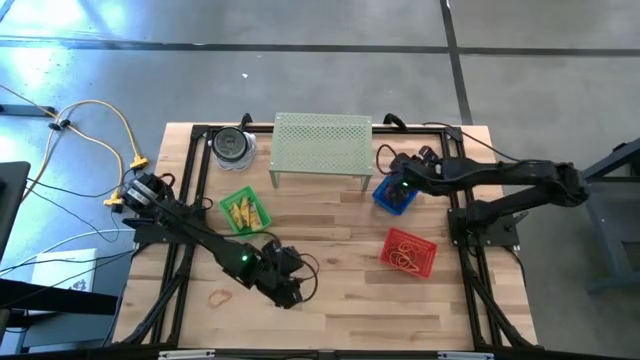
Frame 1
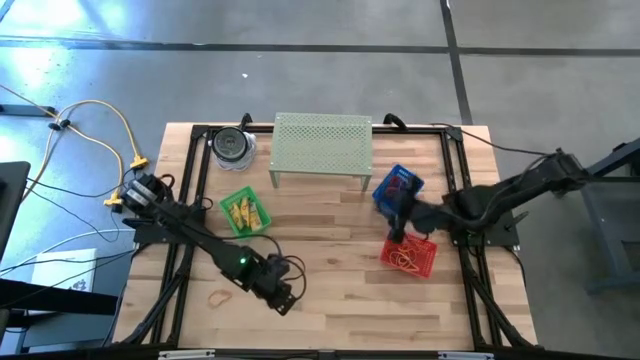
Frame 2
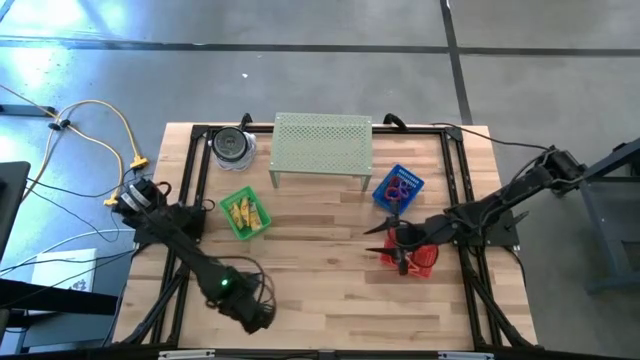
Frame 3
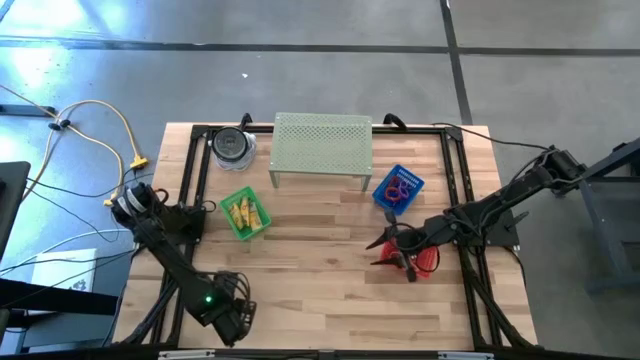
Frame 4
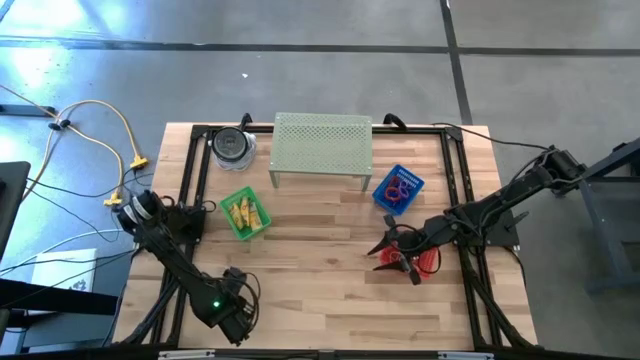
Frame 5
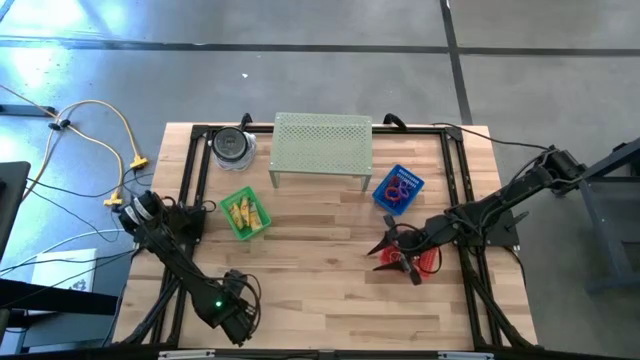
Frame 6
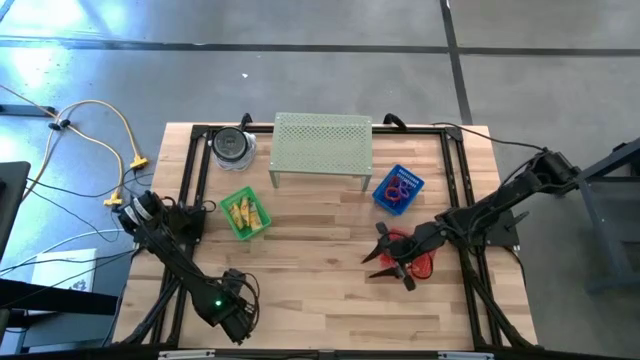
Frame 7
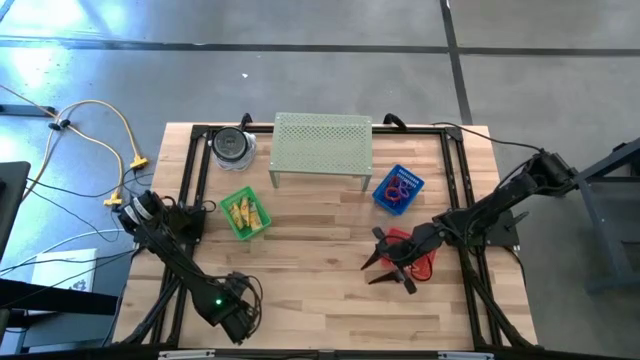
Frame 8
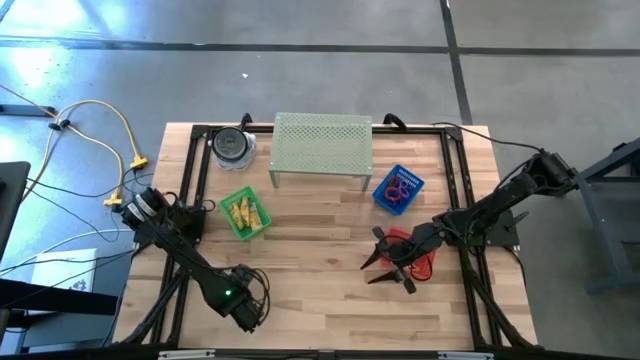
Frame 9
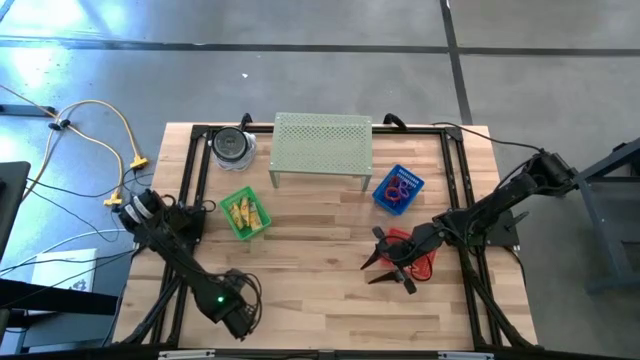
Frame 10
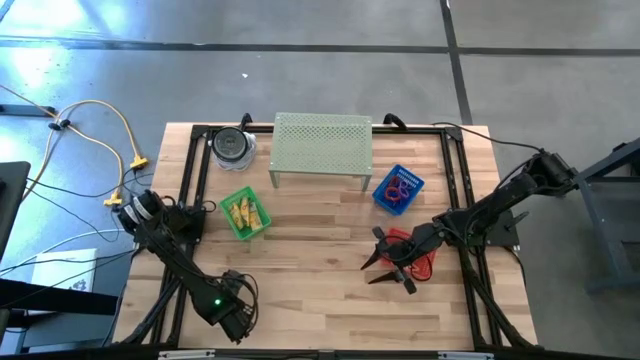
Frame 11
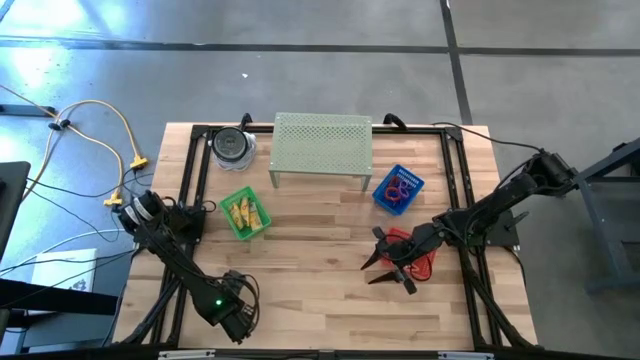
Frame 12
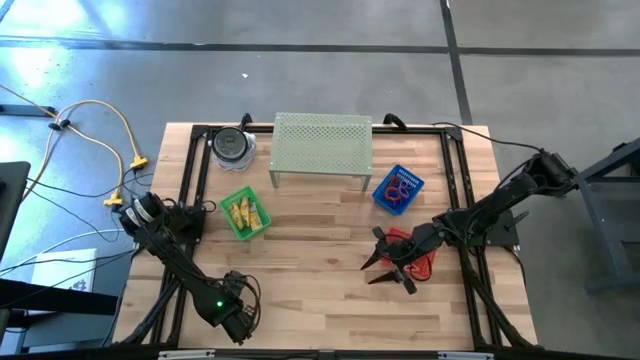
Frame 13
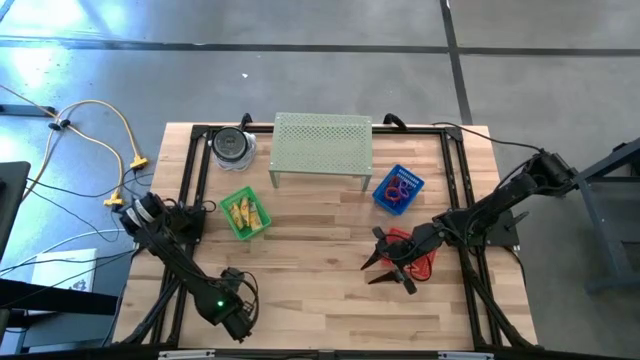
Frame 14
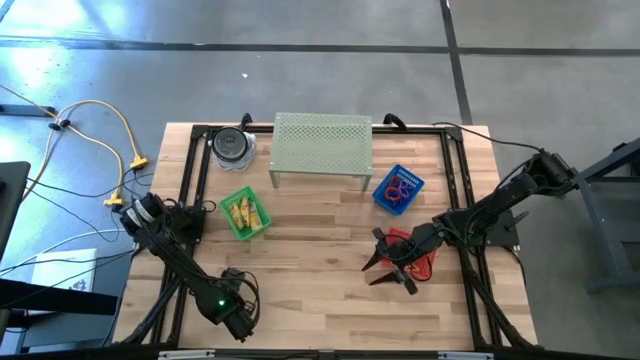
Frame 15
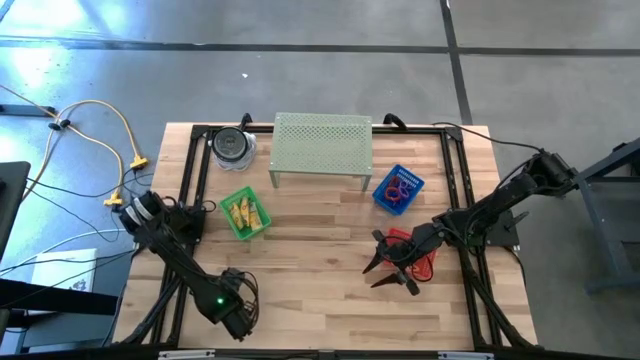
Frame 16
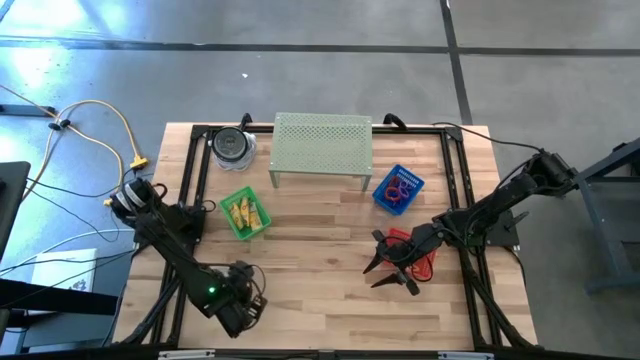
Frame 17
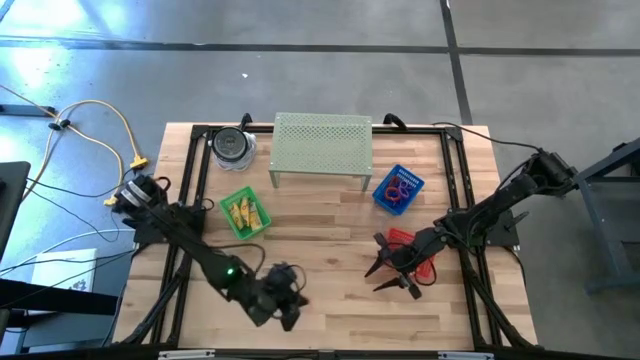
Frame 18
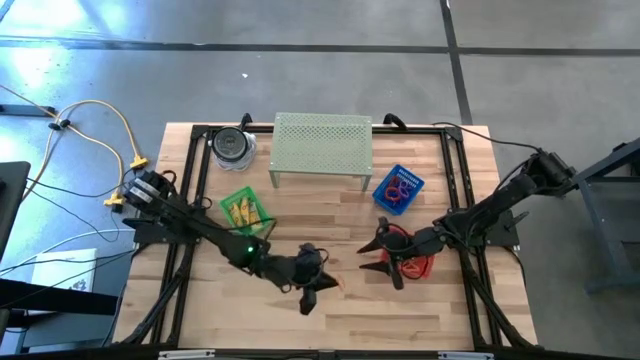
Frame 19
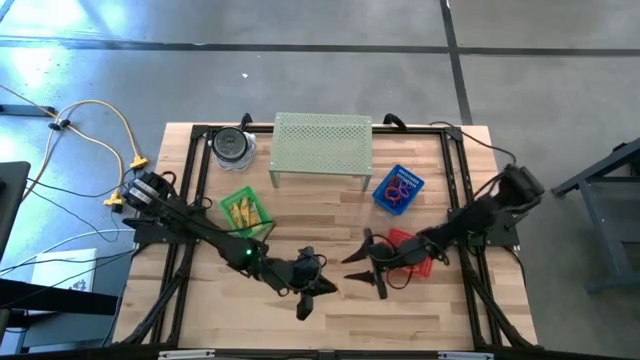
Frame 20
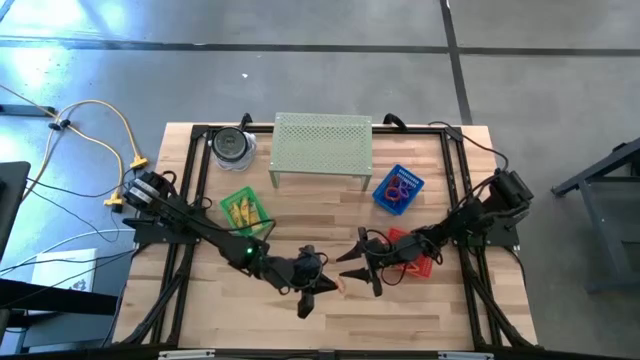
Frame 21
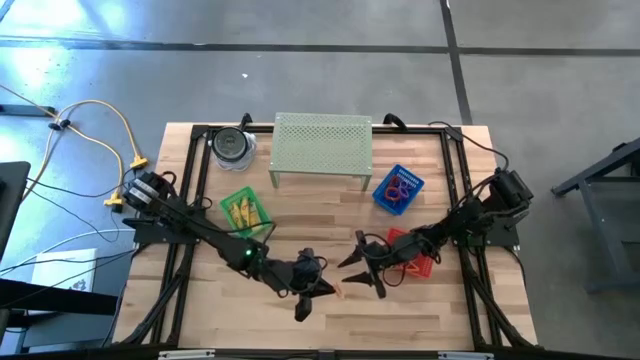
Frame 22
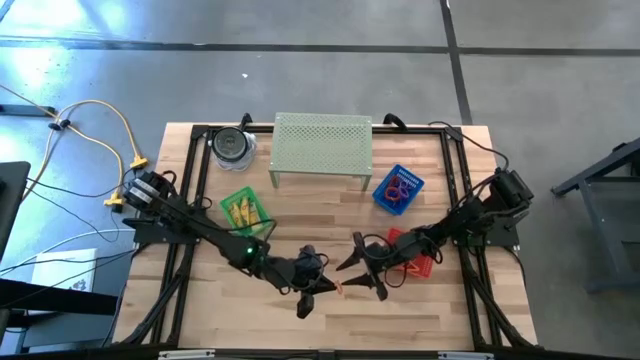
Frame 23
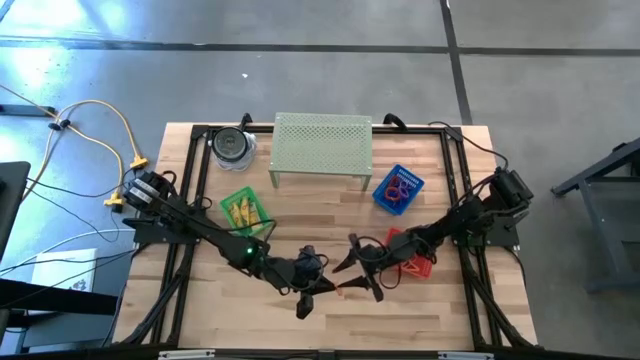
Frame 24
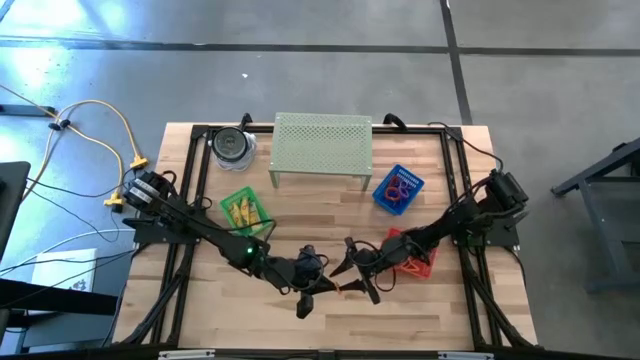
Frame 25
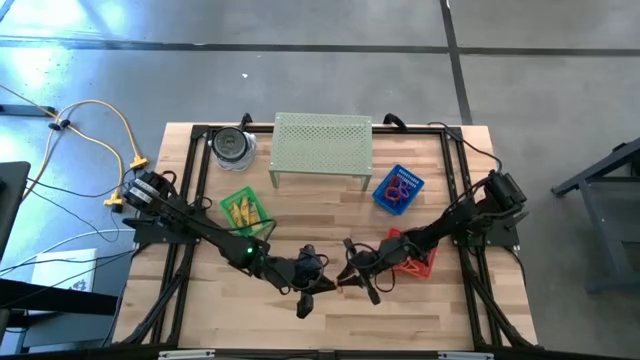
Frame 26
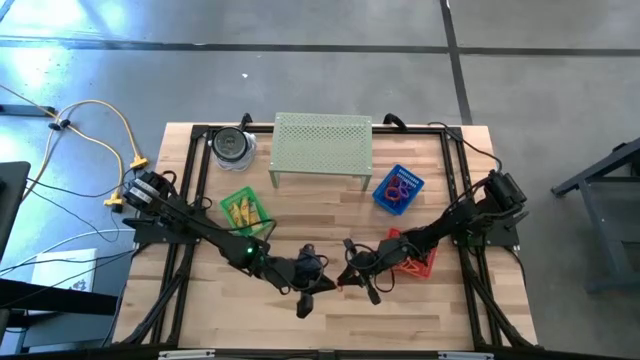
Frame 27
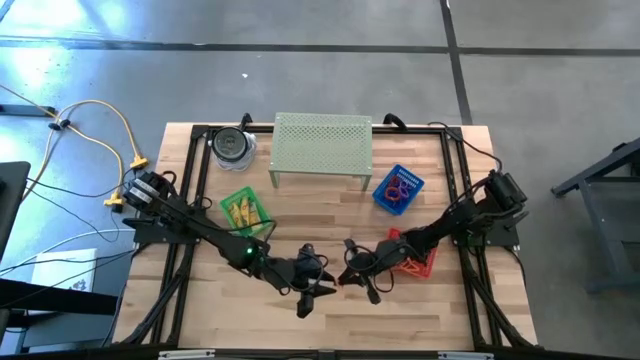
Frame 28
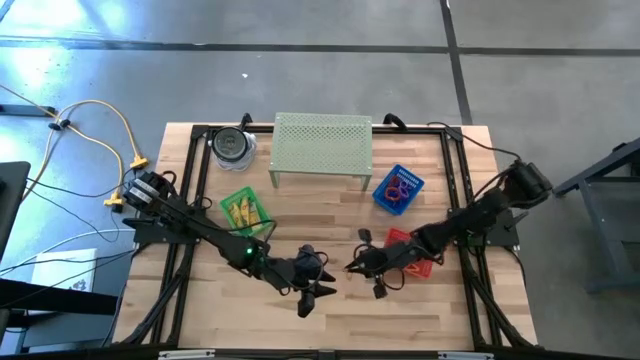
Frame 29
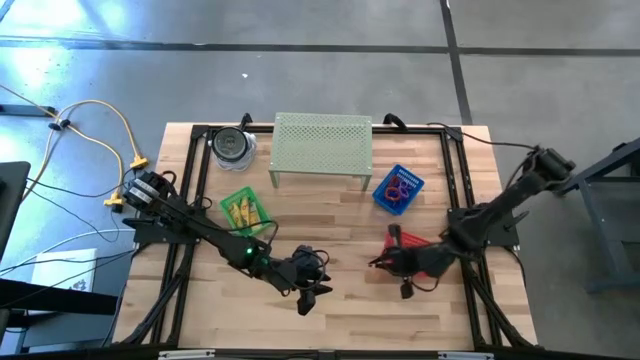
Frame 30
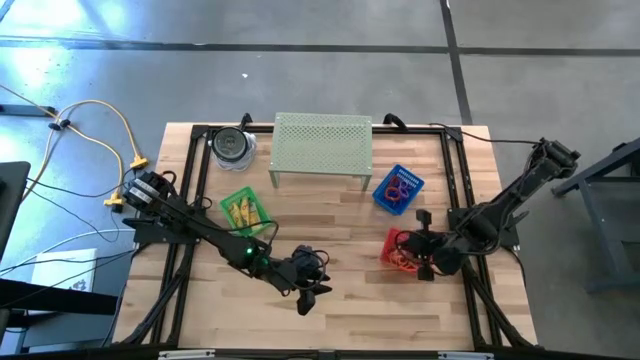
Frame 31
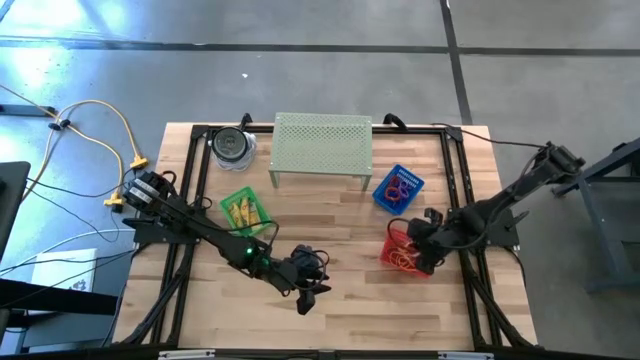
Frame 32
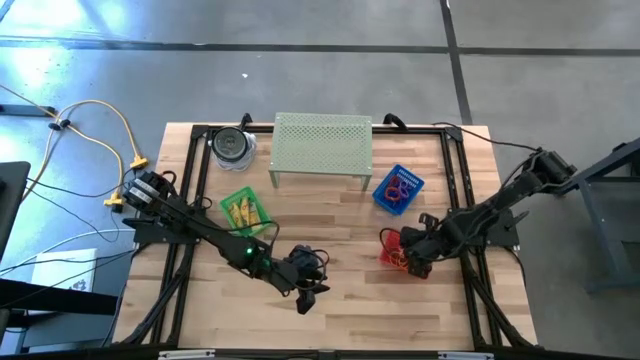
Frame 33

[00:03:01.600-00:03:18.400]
Task: Pick & Place Office Desk Supplies
Put the orange rubberband into the red basket

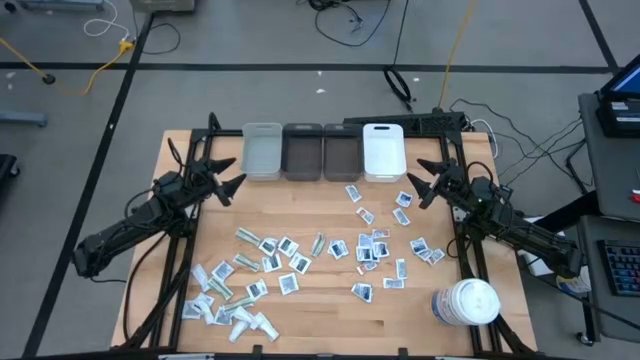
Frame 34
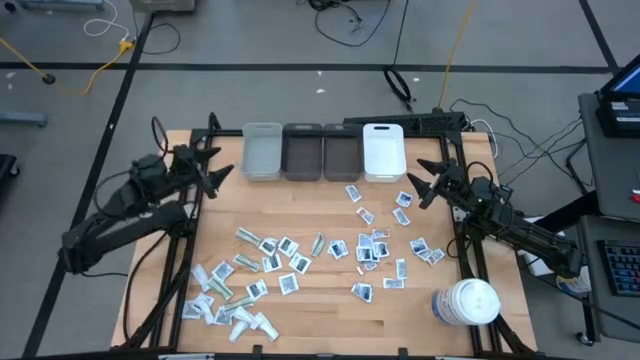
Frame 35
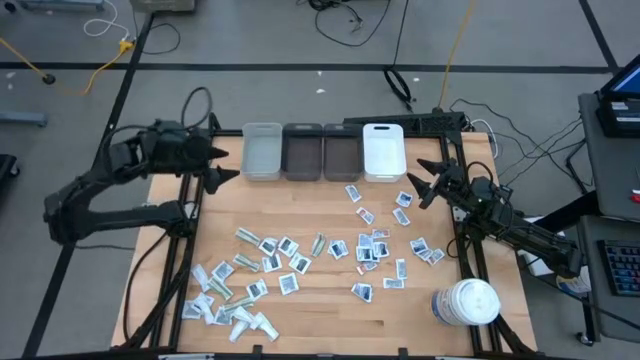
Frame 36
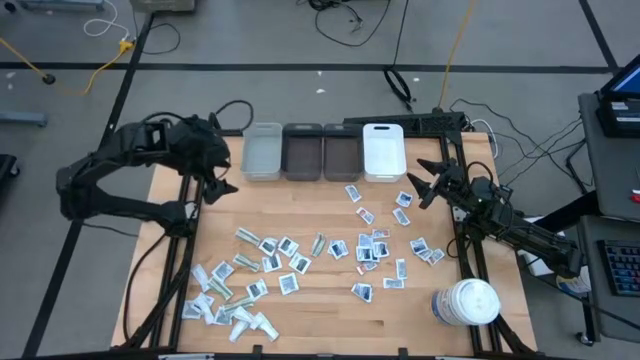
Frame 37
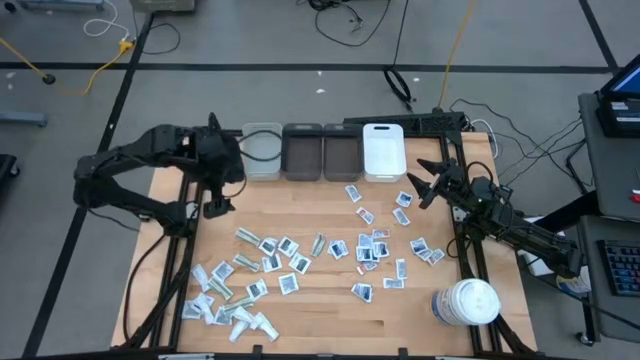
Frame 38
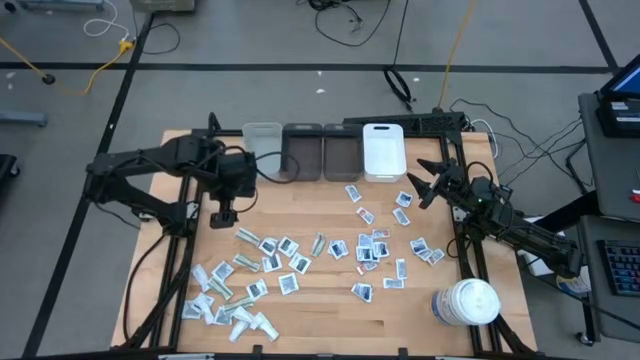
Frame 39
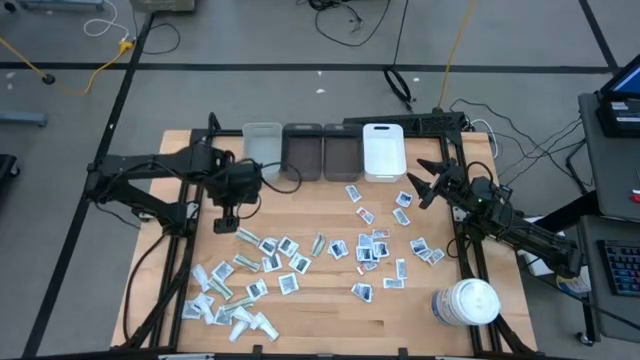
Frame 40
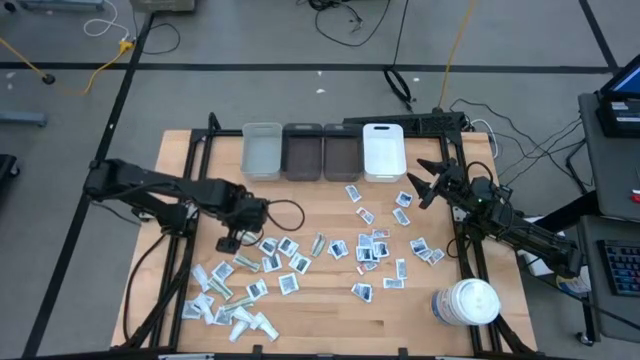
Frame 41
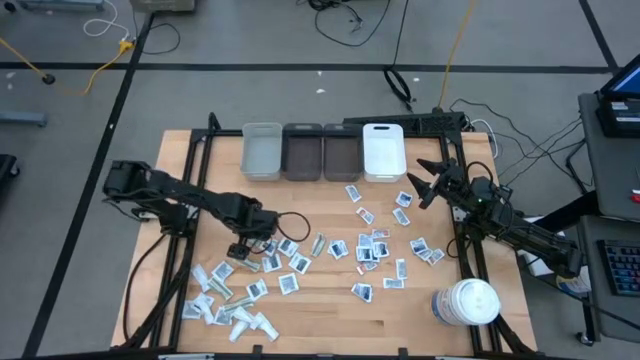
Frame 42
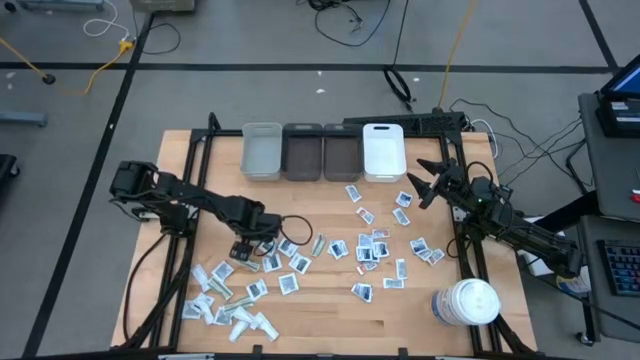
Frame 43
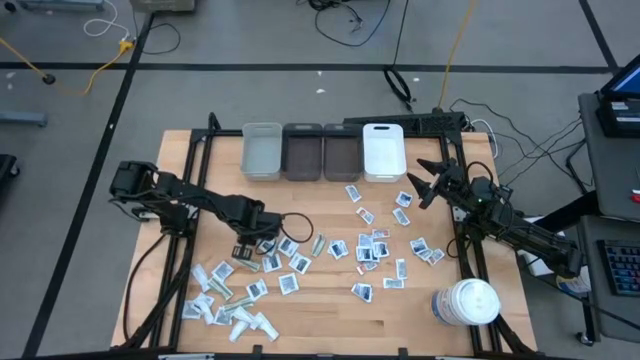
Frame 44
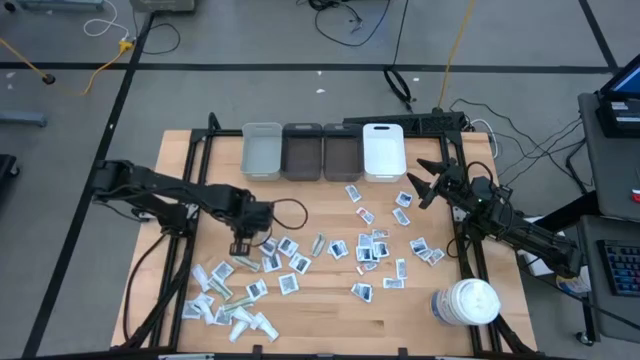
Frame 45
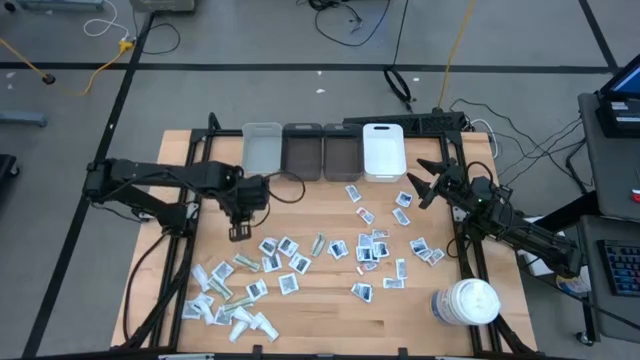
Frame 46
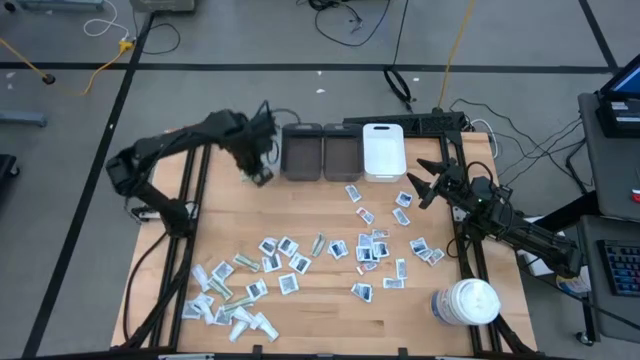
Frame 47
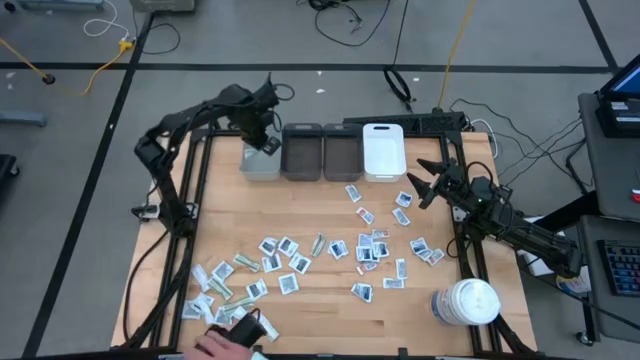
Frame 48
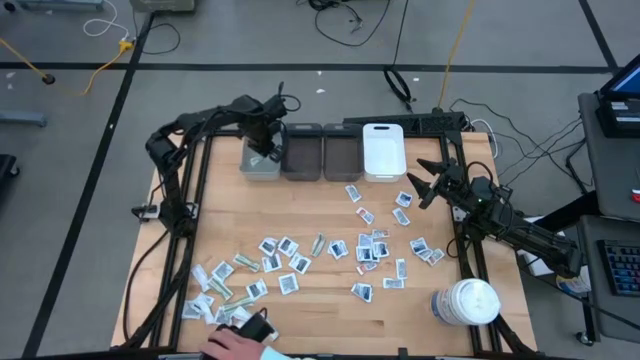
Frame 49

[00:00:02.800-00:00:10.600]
Task: Pick & Place First Aid Supplies
Put the bandage into the gray bin
